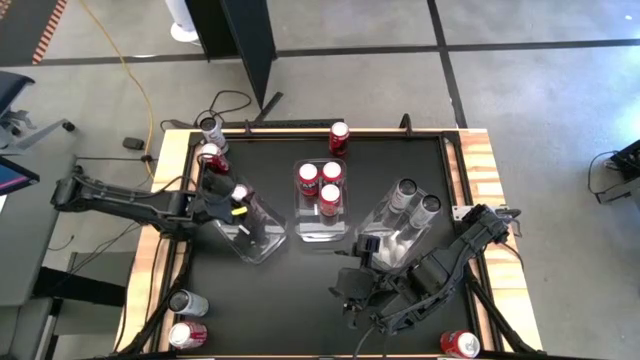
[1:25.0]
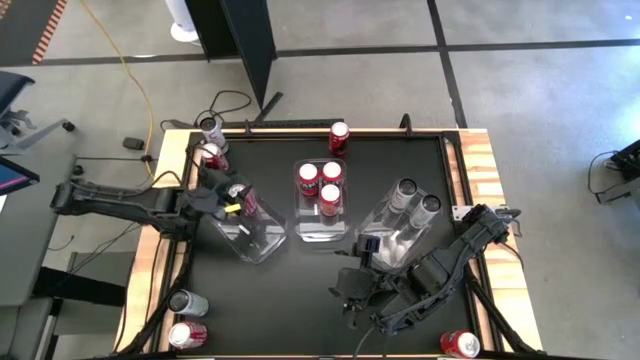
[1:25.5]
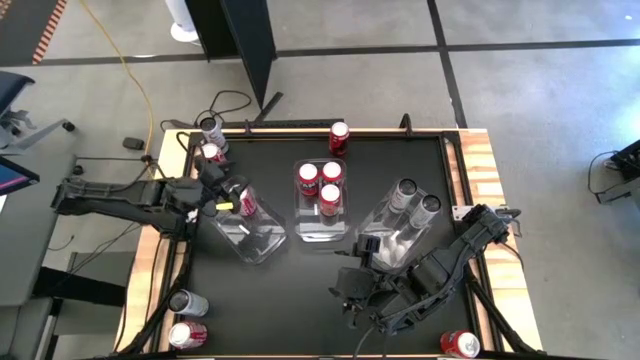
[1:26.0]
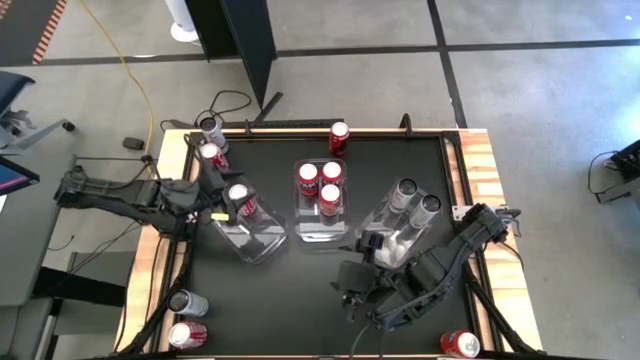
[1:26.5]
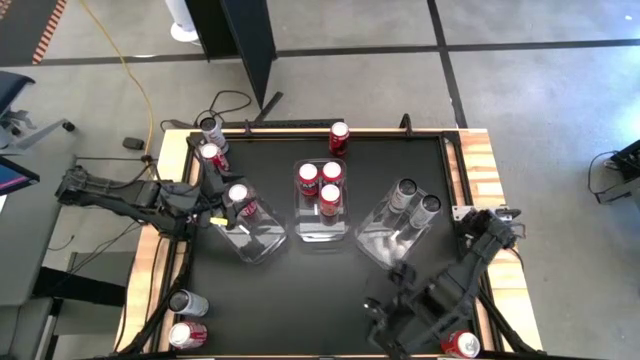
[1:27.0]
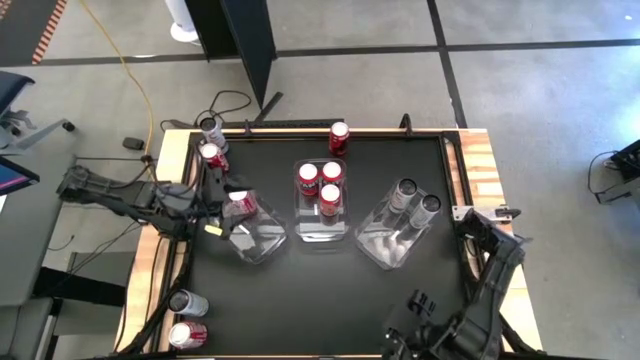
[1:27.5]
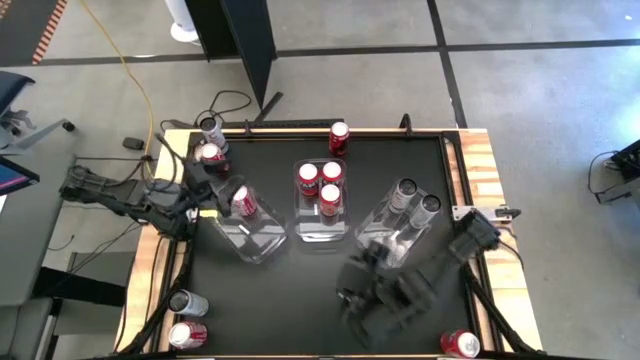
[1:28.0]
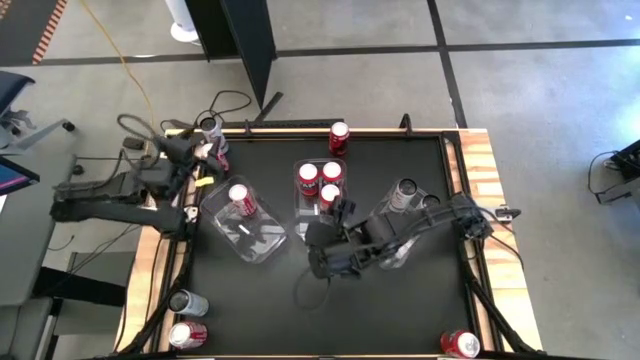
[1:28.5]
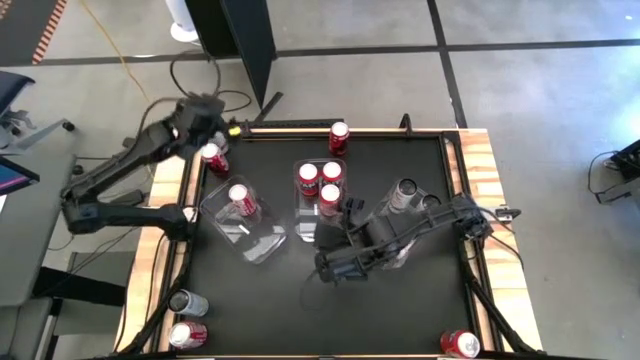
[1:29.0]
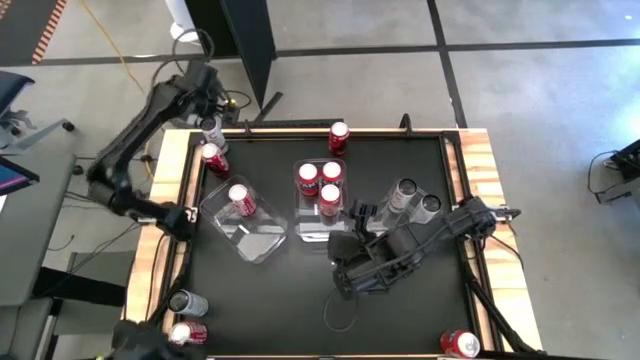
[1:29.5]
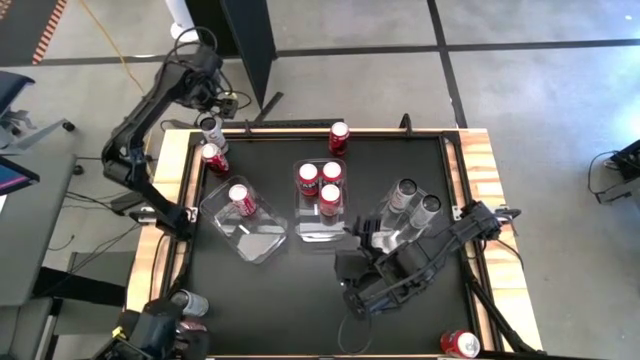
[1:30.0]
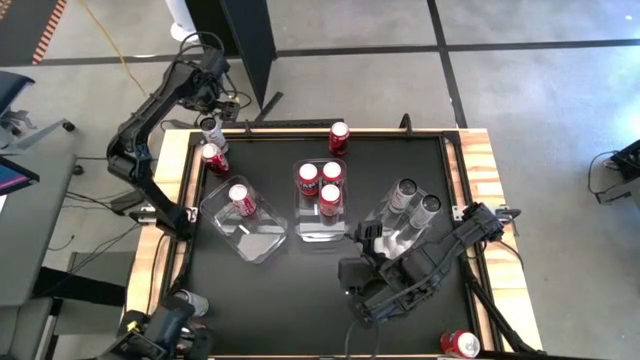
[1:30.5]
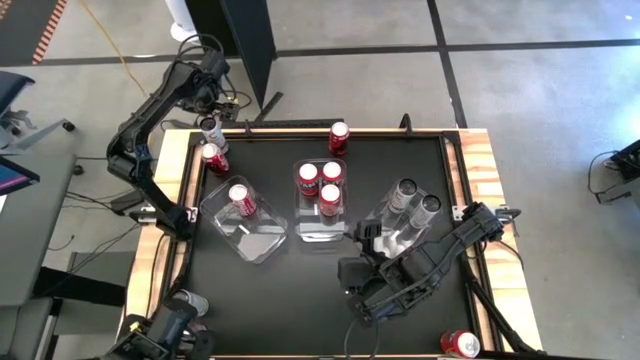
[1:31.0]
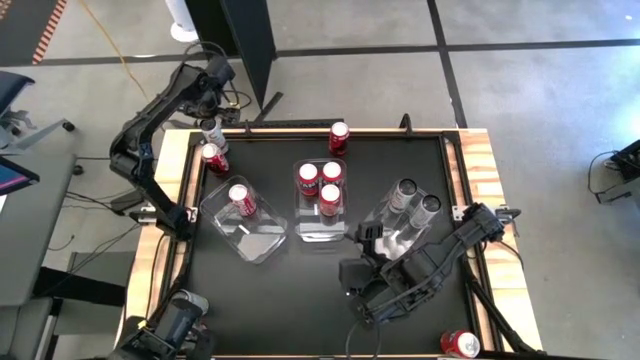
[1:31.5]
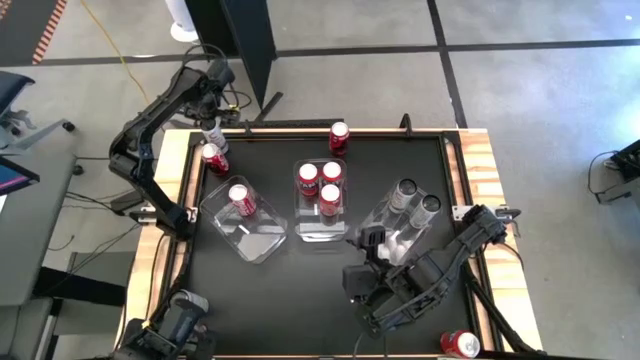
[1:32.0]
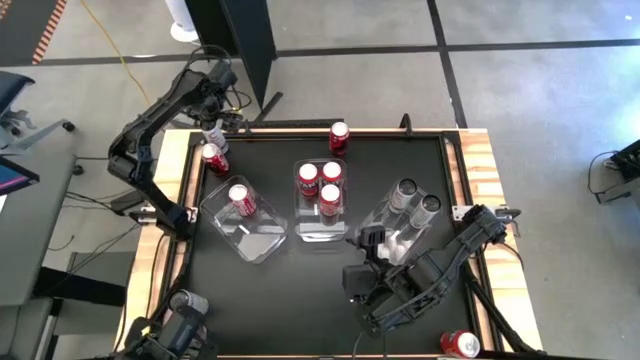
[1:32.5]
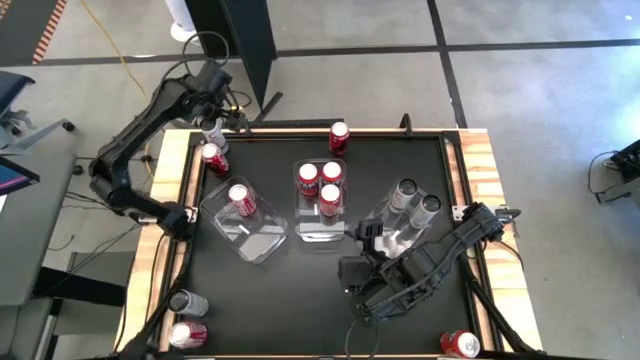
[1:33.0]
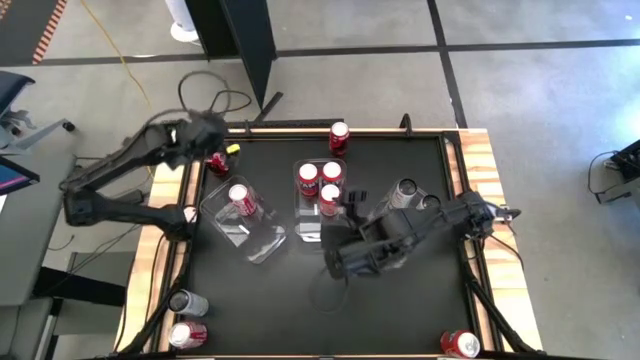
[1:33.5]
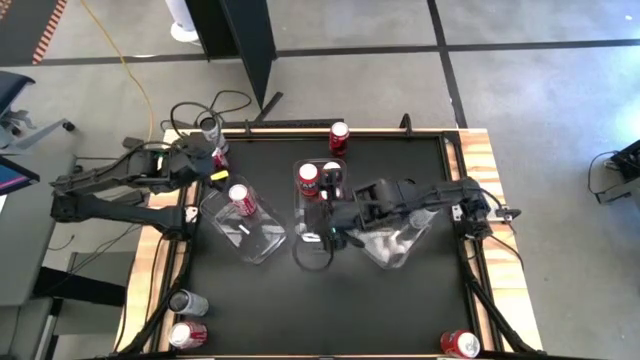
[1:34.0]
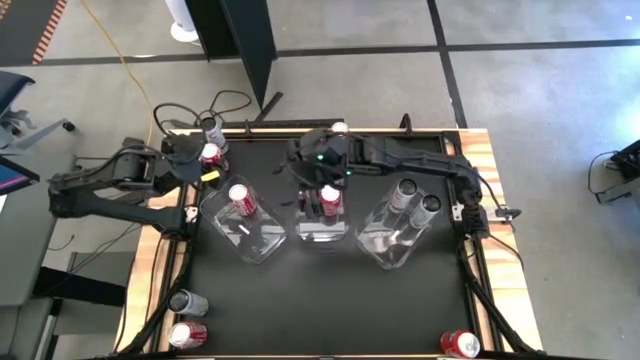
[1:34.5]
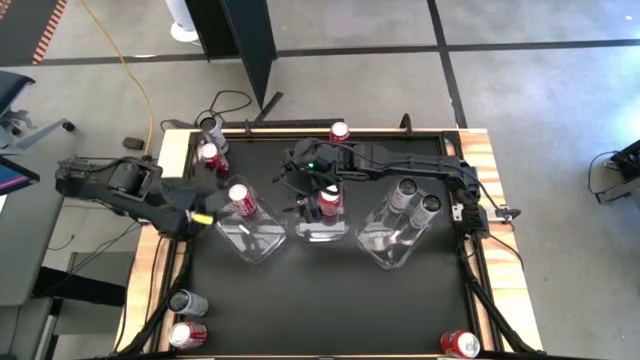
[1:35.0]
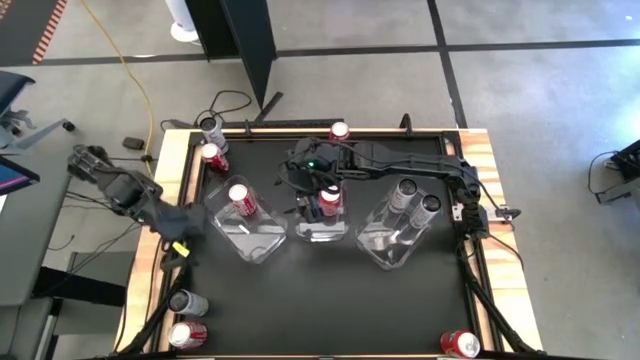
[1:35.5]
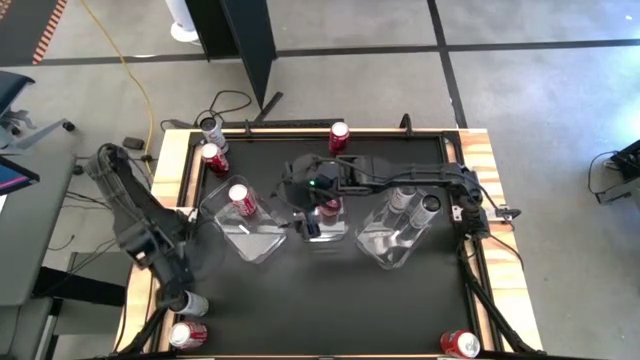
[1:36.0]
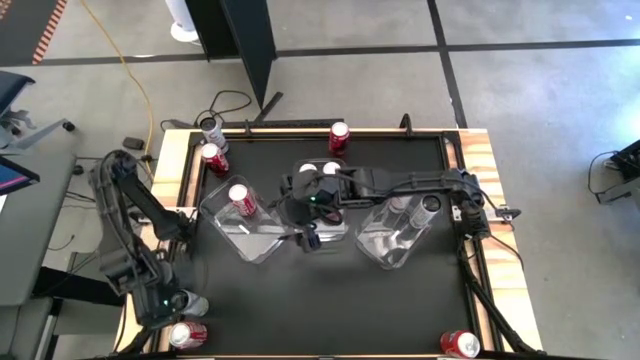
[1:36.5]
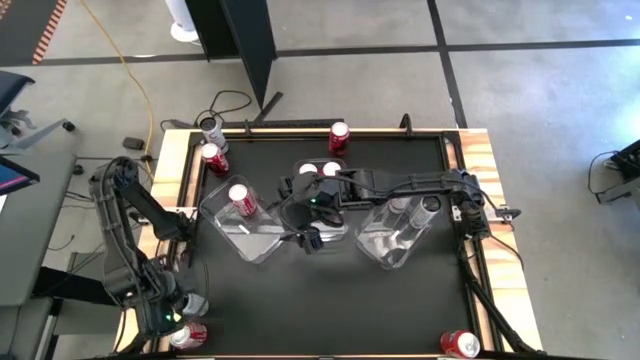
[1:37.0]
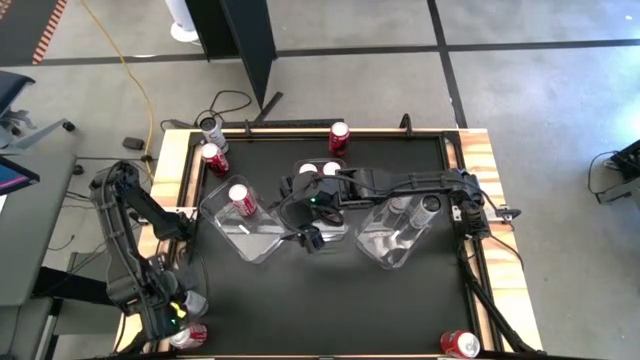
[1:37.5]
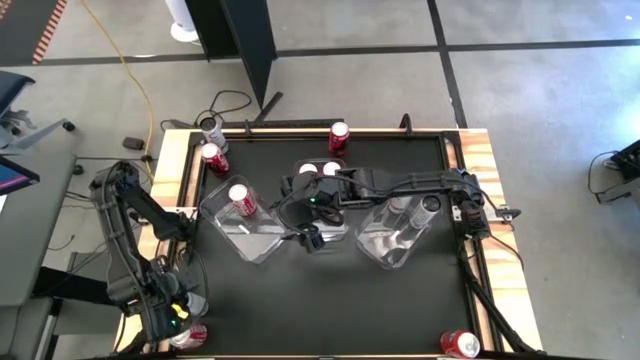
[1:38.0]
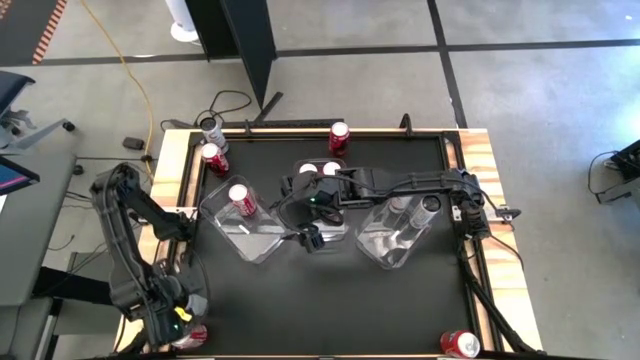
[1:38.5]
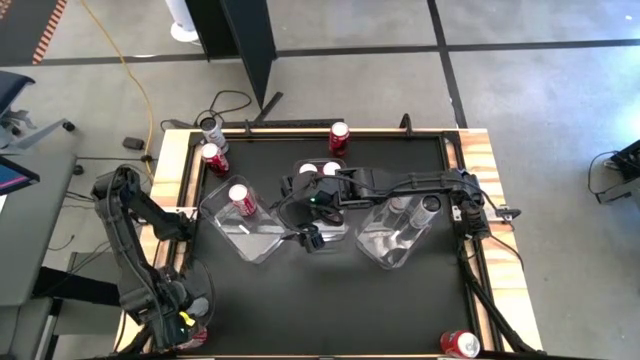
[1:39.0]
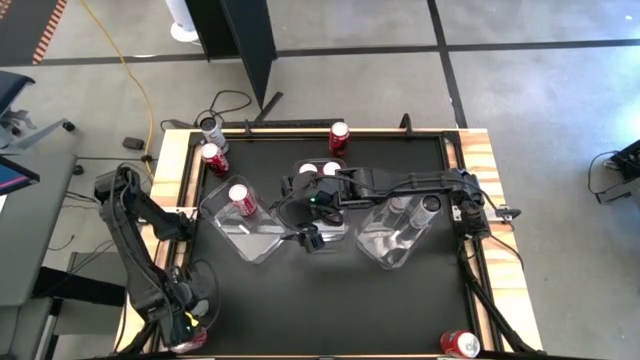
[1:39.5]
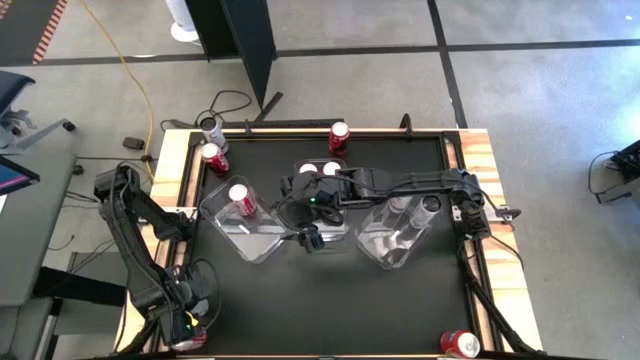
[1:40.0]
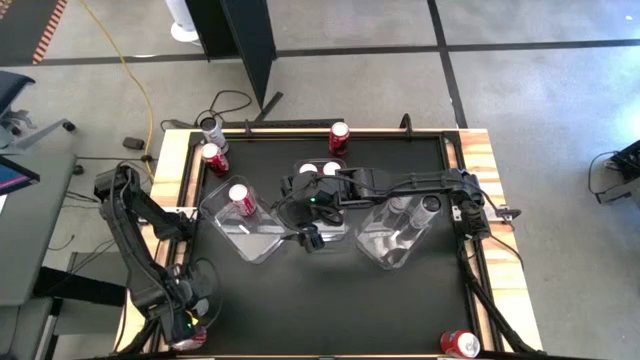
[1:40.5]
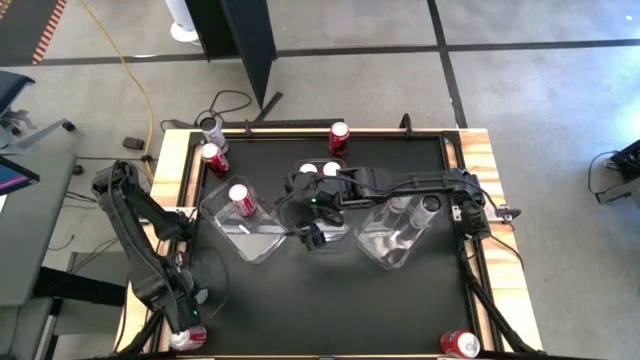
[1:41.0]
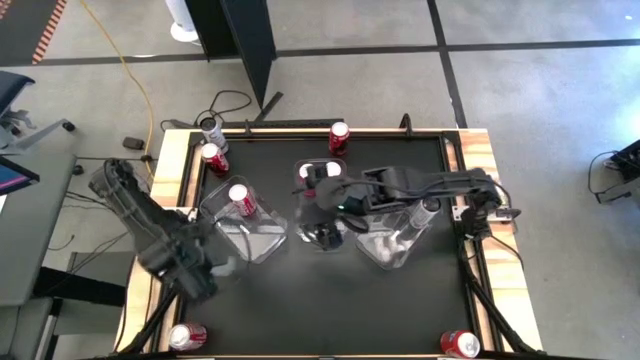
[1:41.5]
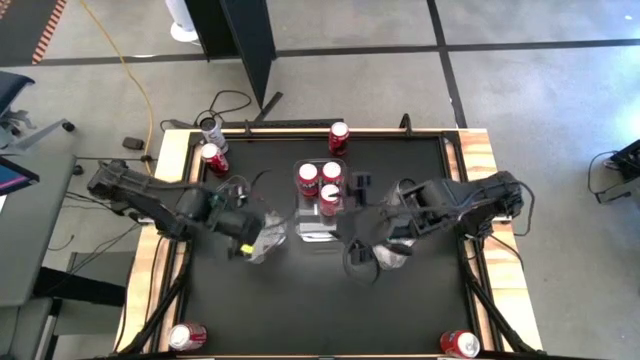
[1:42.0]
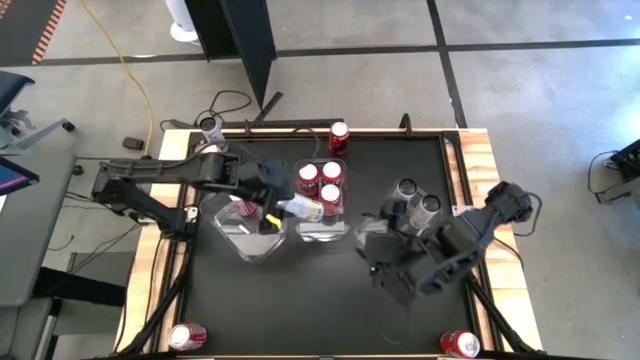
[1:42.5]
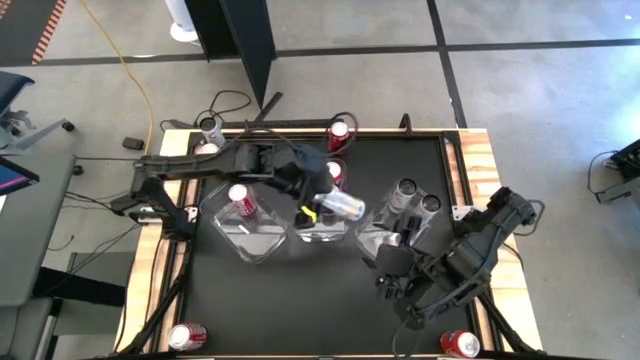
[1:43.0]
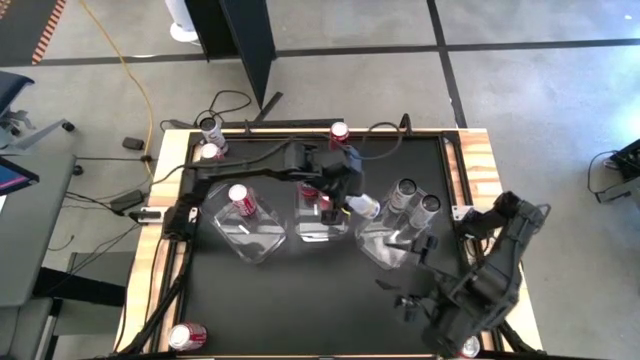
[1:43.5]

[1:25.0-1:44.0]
Task: Sort soda cans
Put the bottom white soda can into the right transparent bin

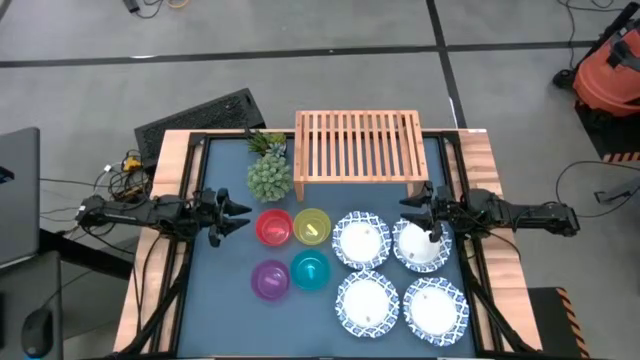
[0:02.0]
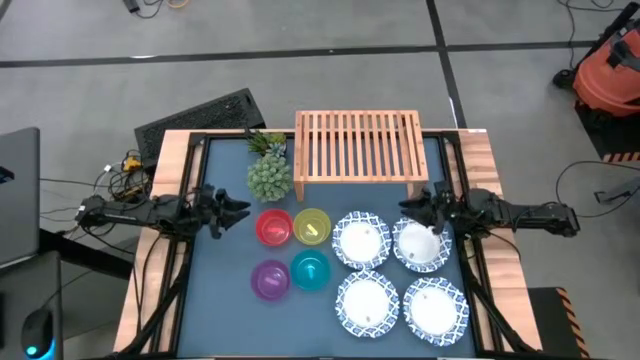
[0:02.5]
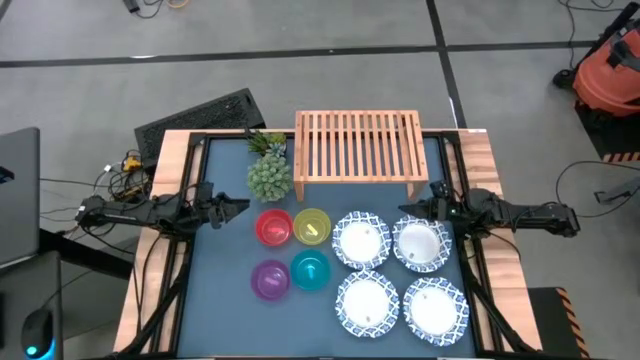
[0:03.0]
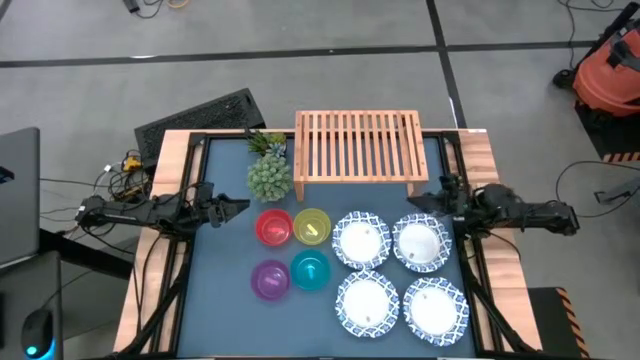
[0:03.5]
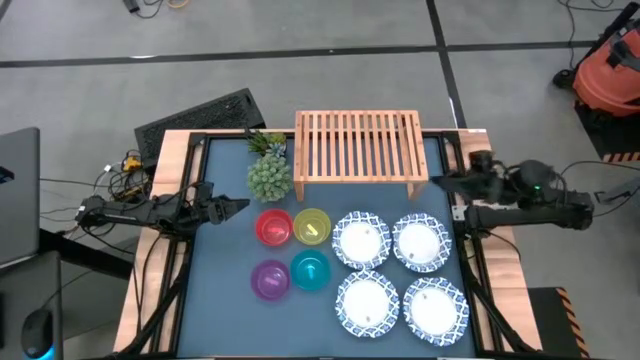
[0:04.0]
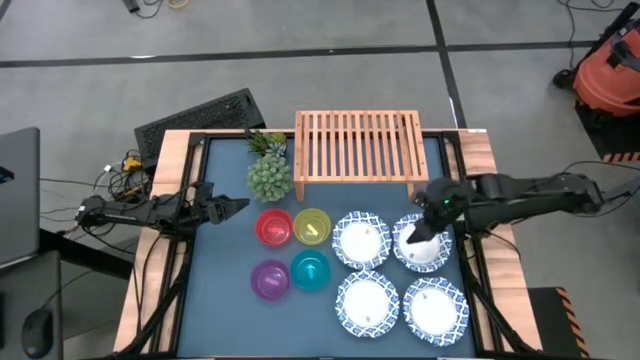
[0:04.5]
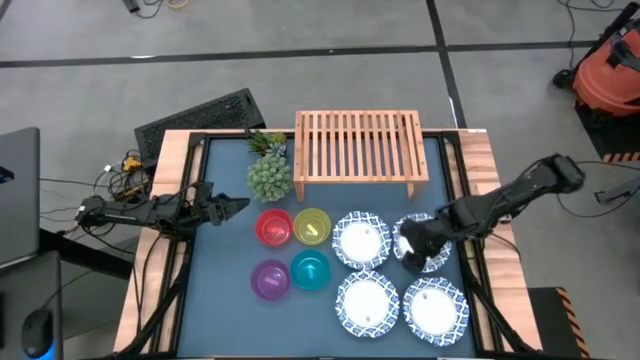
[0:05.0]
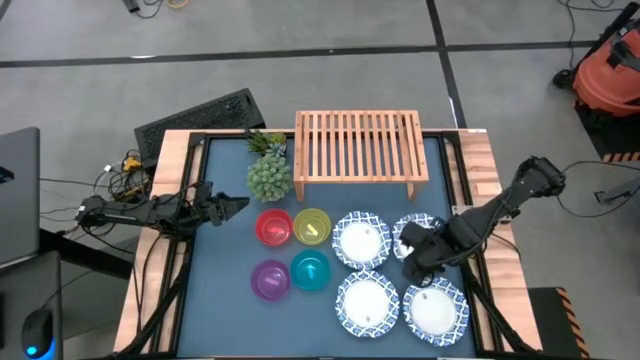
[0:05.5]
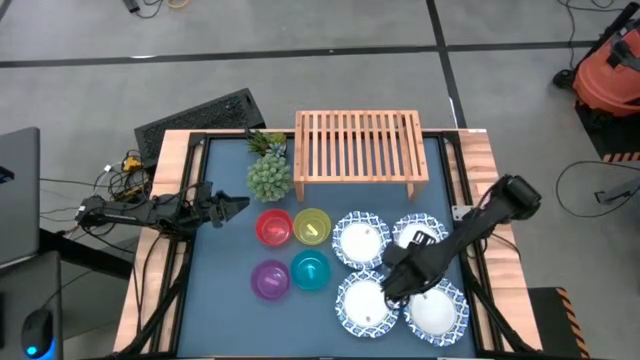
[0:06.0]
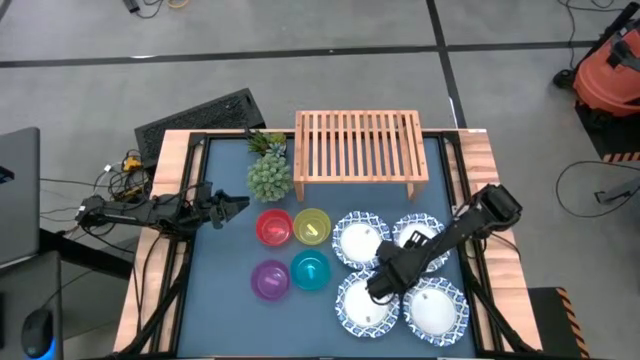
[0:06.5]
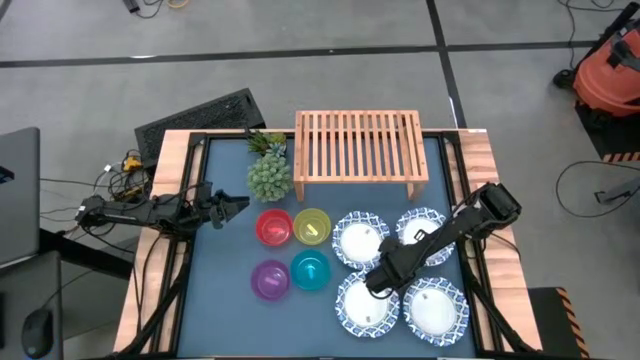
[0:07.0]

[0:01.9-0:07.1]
Task: Place and stack bowls onto a shelf
Put the white patterned bowl on the shelf
